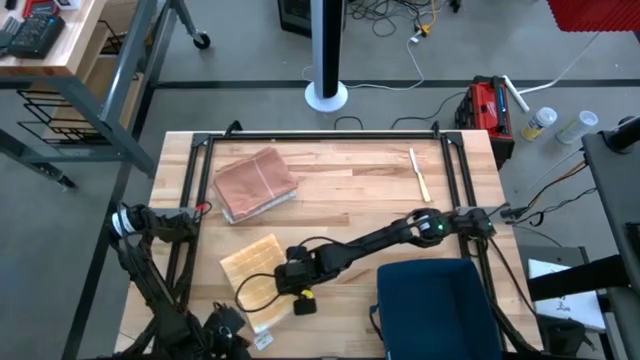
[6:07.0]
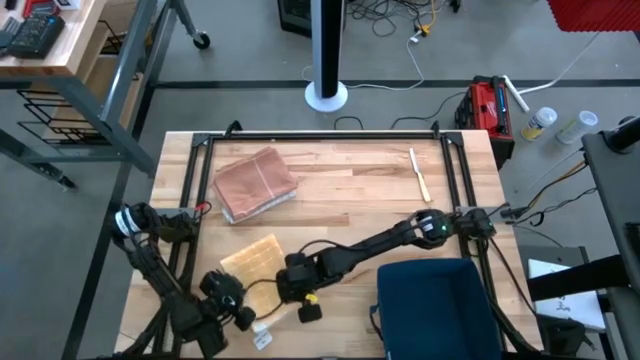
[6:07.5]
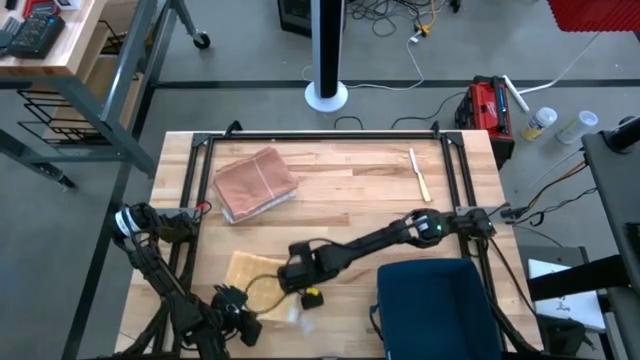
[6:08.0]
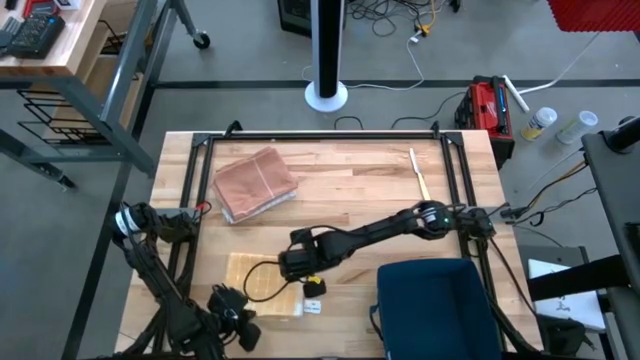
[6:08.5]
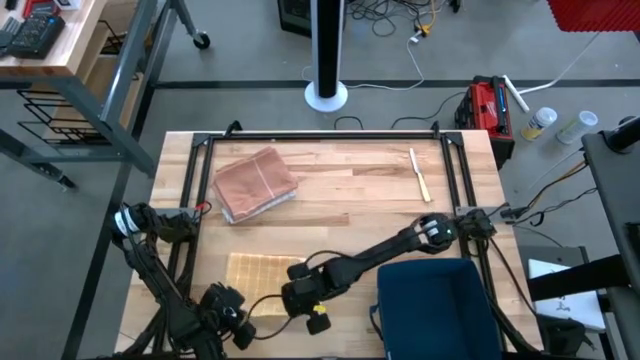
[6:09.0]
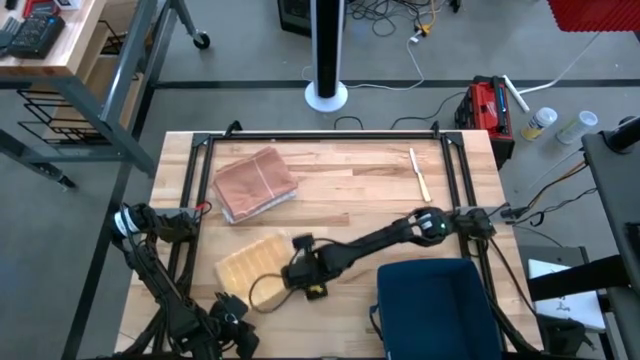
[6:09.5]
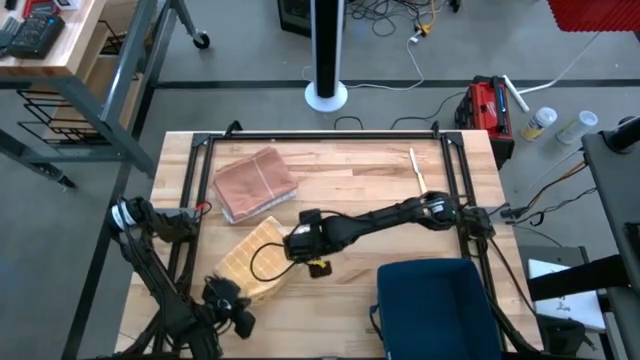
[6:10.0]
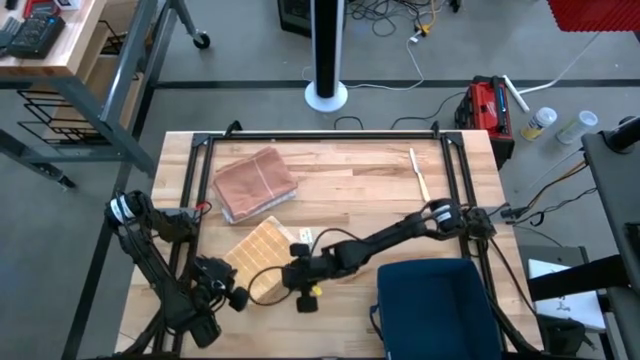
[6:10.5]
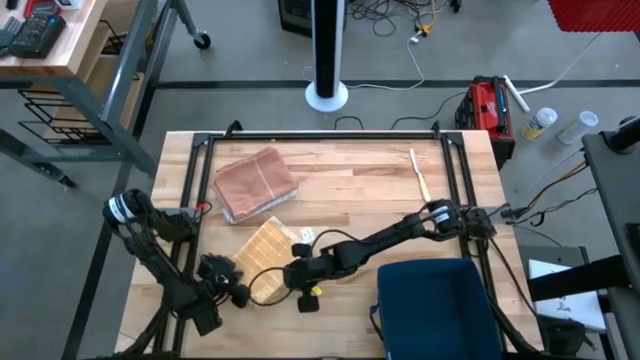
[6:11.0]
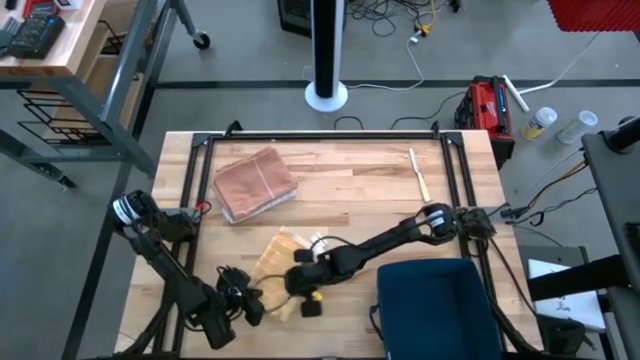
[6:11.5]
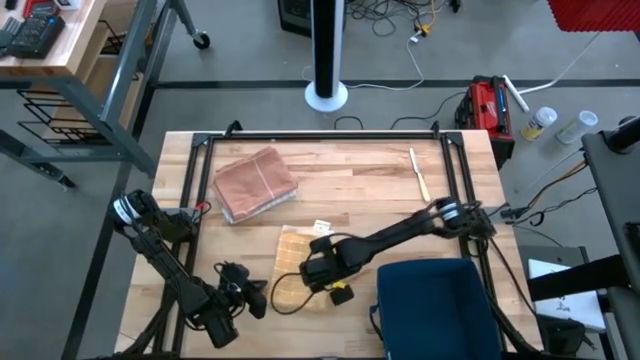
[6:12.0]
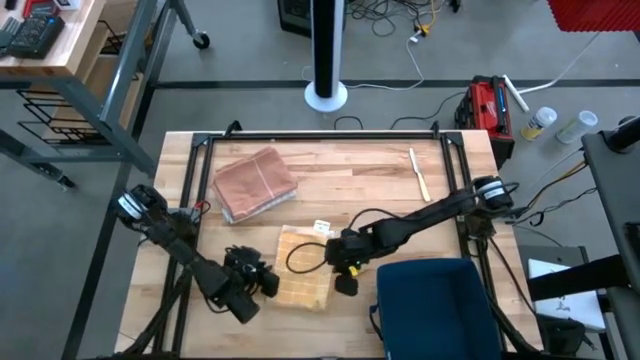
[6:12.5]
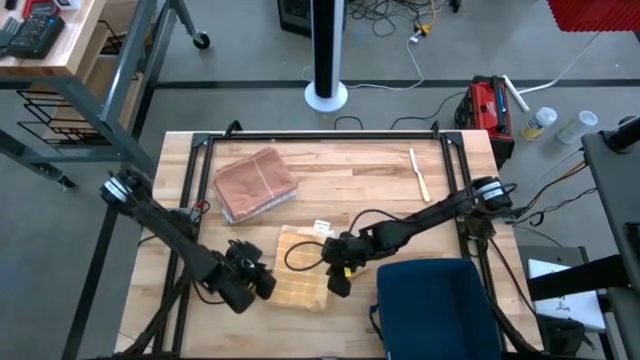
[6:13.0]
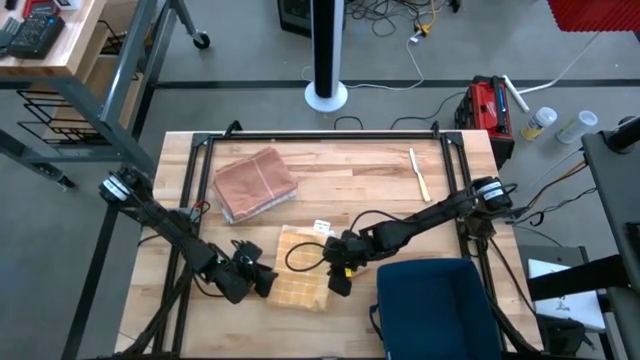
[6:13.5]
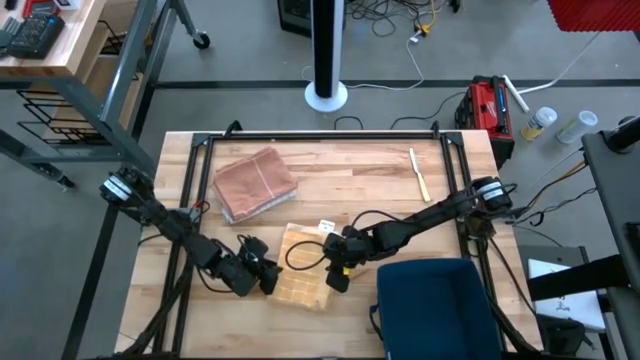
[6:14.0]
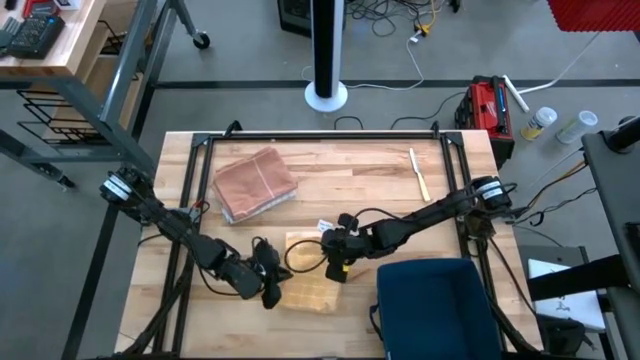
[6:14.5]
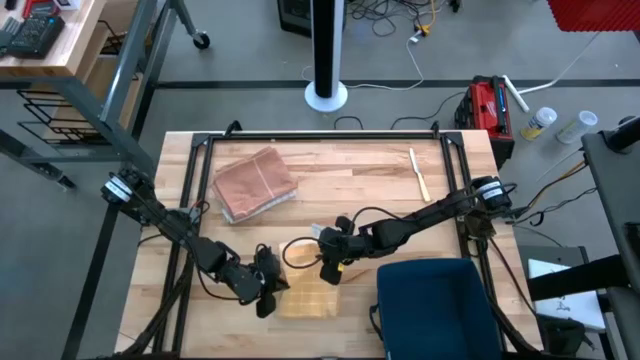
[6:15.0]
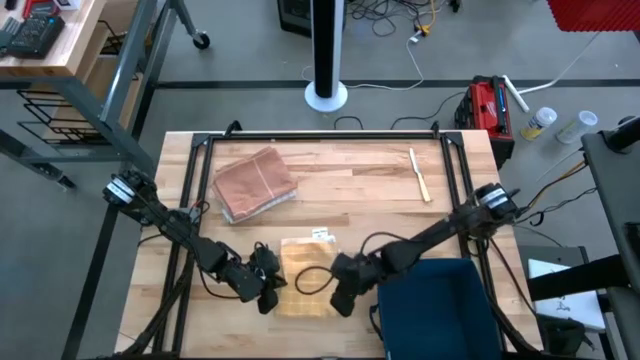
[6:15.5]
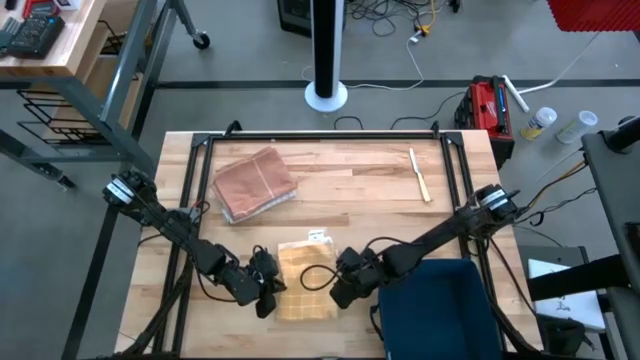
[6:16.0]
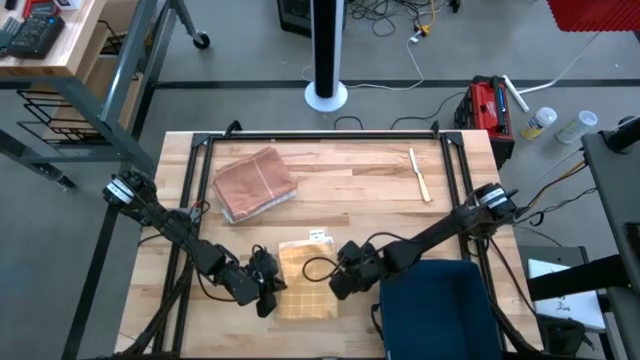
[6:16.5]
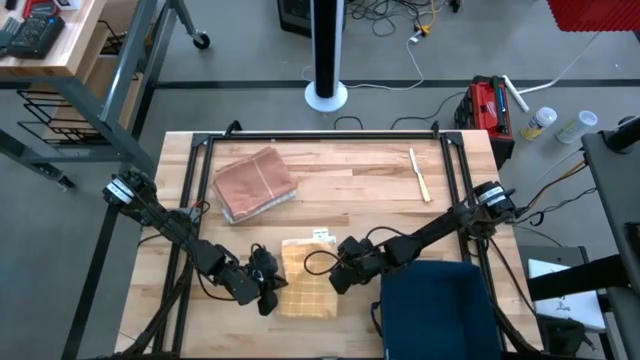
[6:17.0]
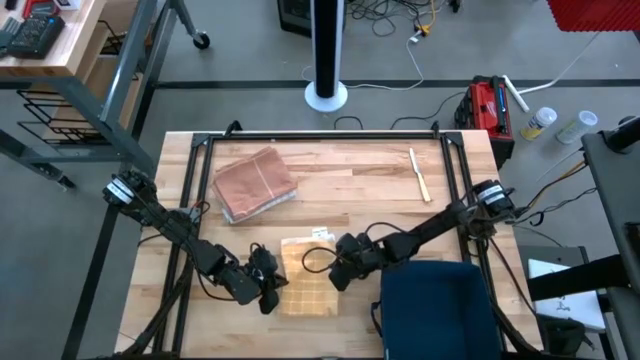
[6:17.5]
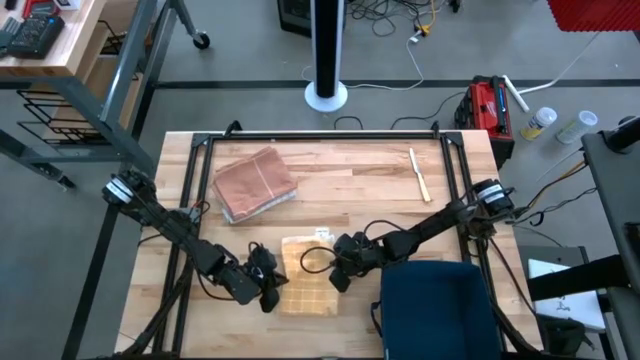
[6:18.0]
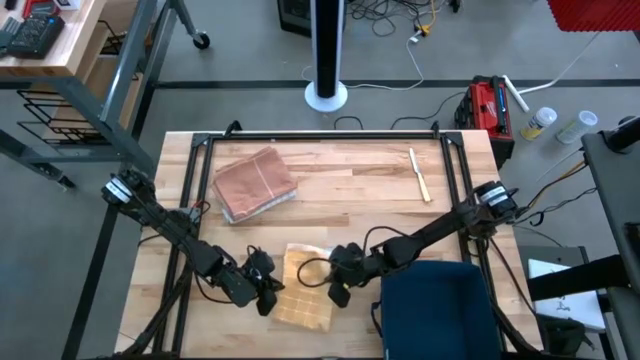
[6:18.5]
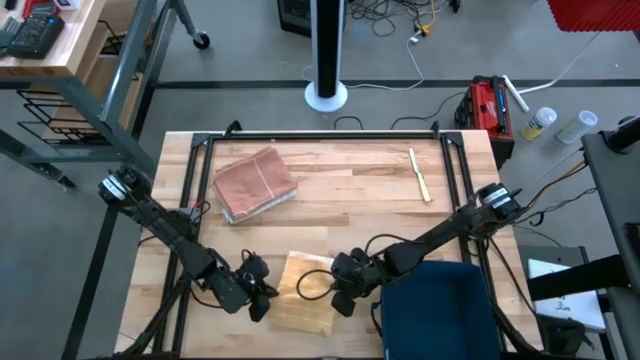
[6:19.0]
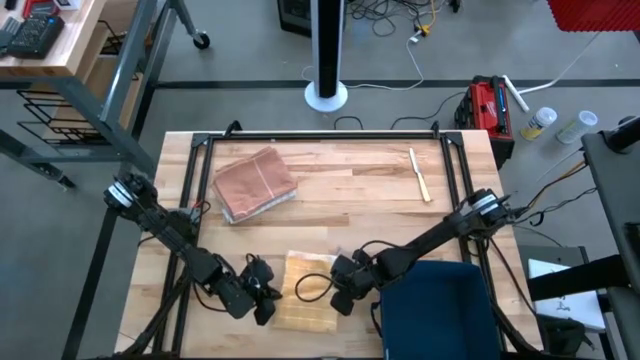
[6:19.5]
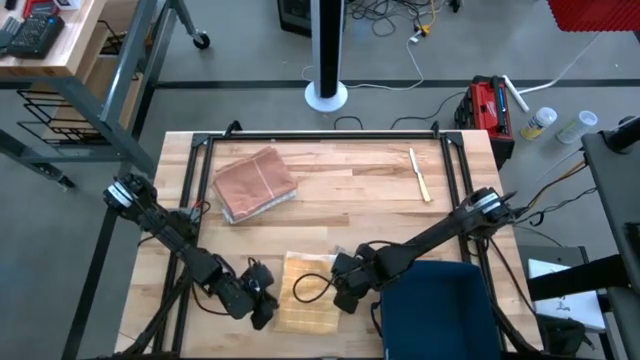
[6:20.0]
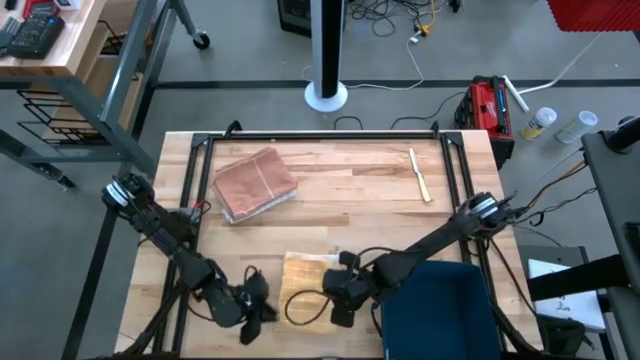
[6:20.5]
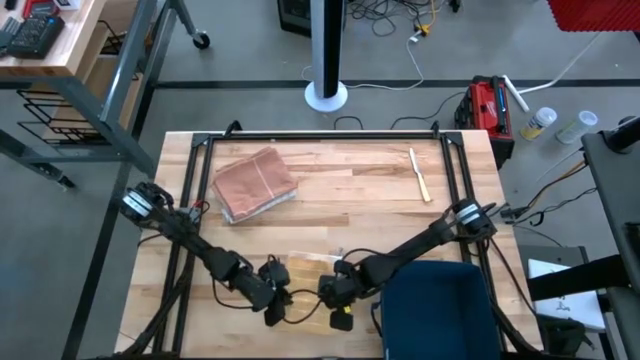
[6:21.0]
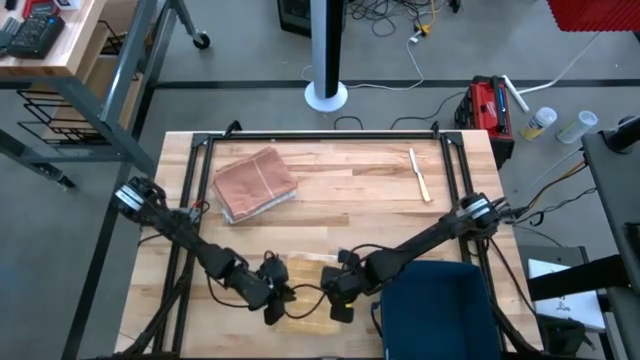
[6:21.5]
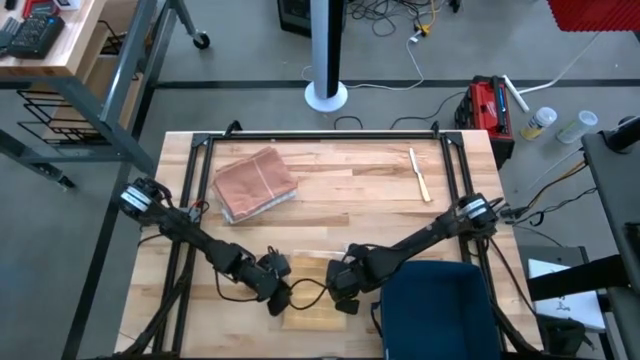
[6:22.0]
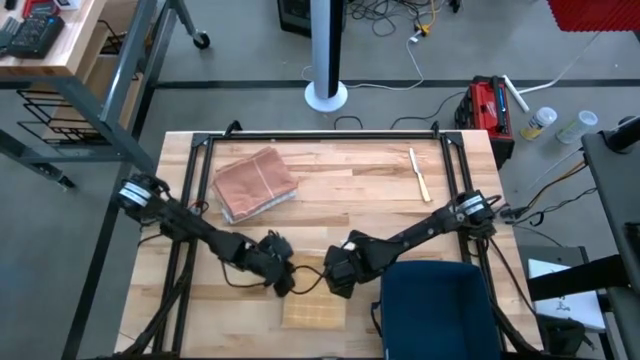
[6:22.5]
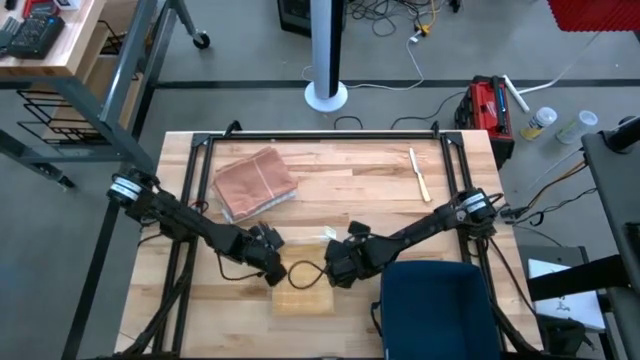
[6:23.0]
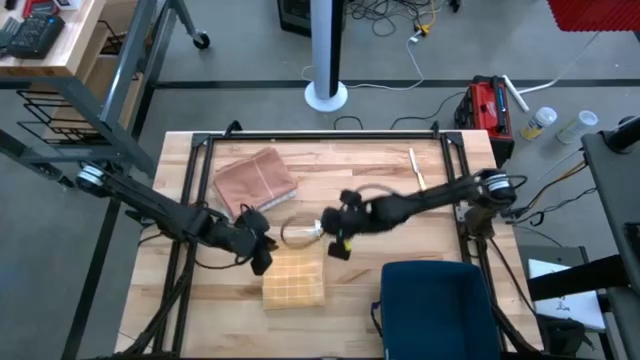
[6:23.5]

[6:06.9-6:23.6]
Task: Fold towel
Fold the yellow towel

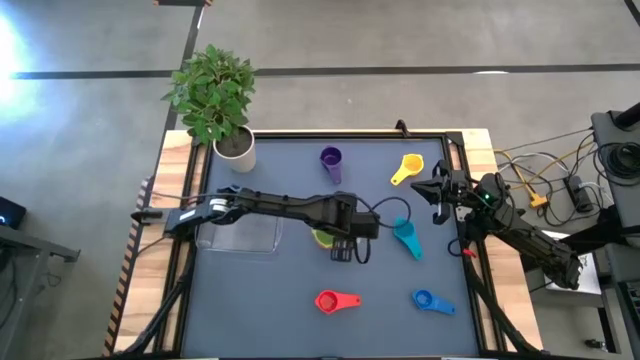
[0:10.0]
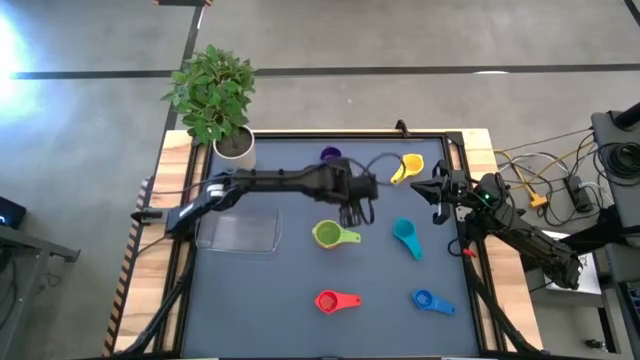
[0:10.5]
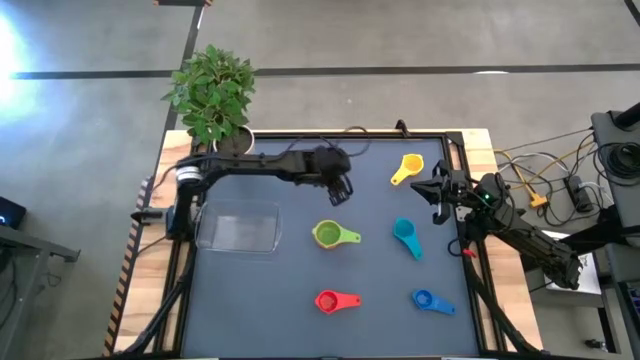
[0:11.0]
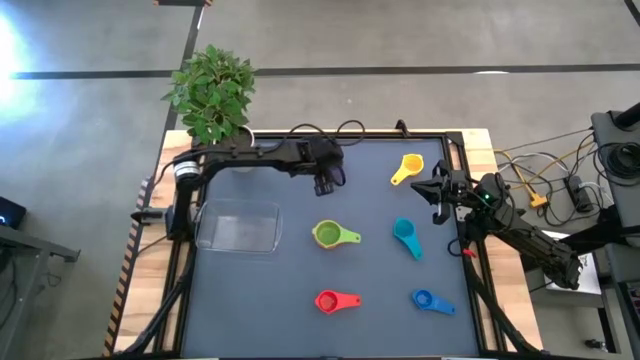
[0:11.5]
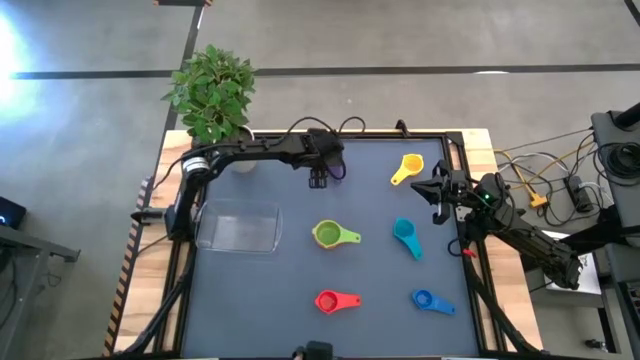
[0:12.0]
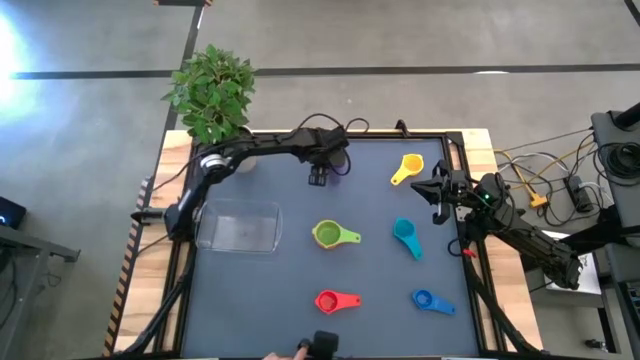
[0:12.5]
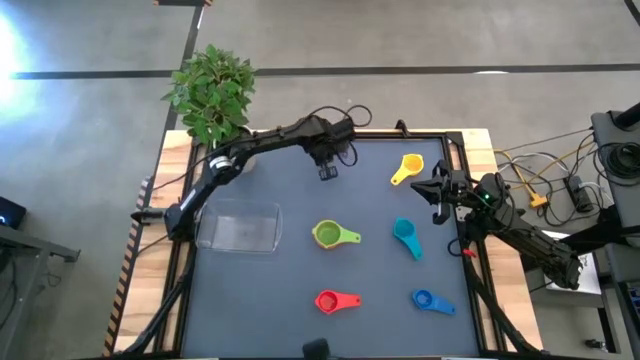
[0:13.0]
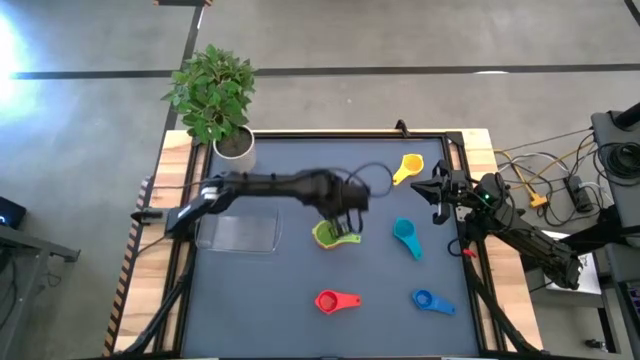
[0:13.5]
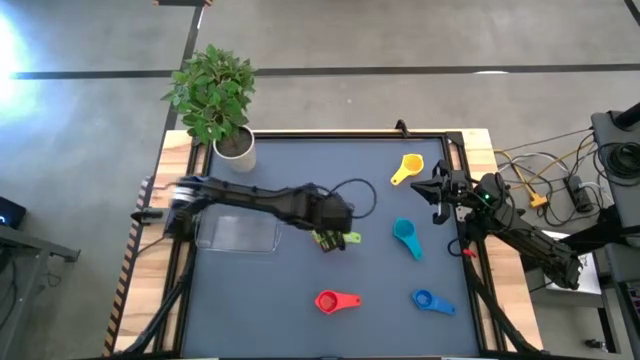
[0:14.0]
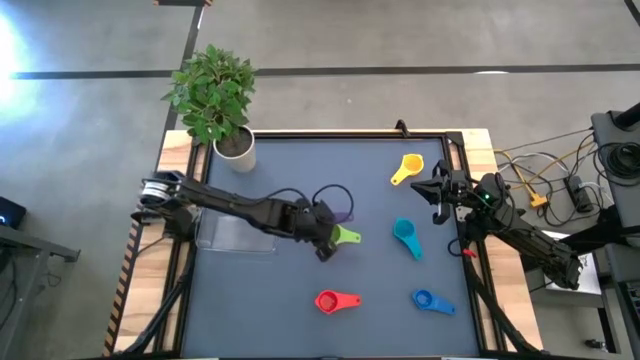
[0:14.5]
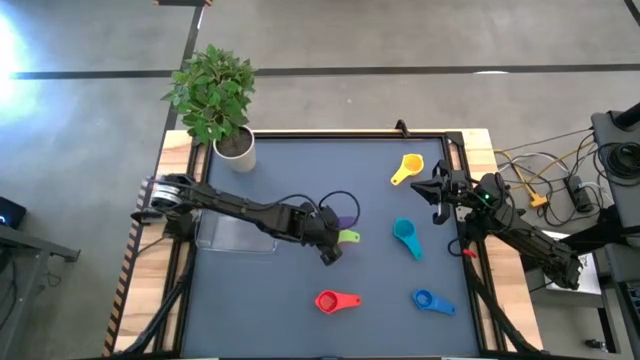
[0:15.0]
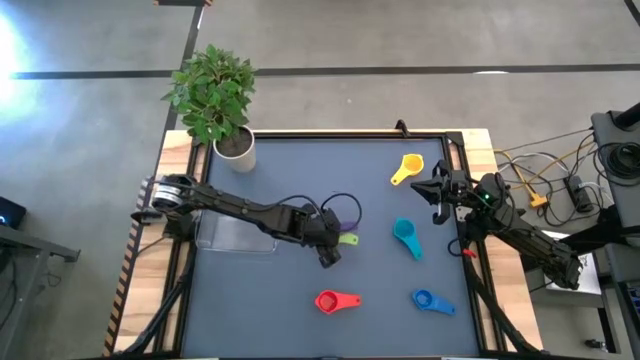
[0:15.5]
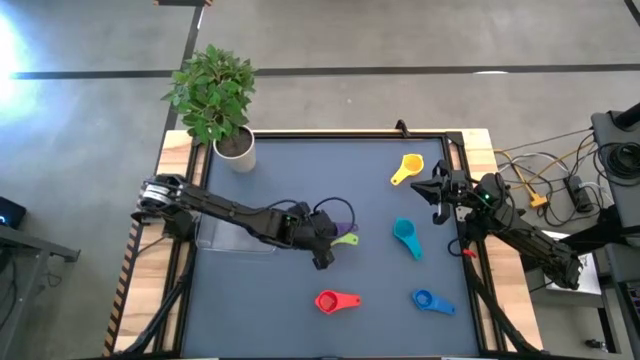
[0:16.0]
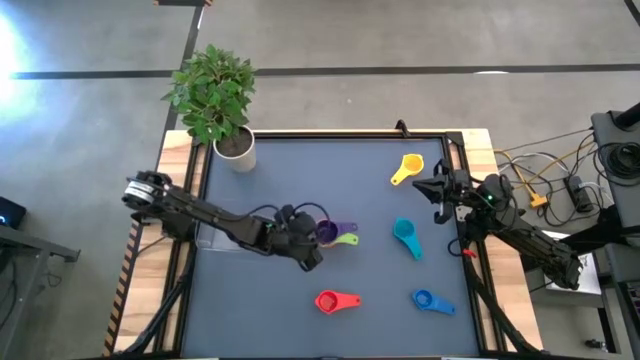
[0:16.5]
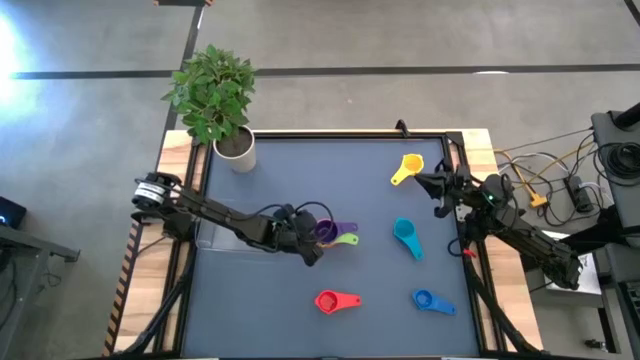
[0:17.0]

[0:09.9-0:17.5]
Task: Nest measuring cups in basket
Stack the purple measuring cup on top of the green measuring cup
